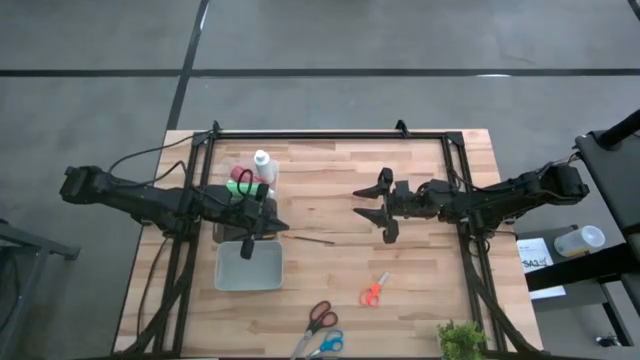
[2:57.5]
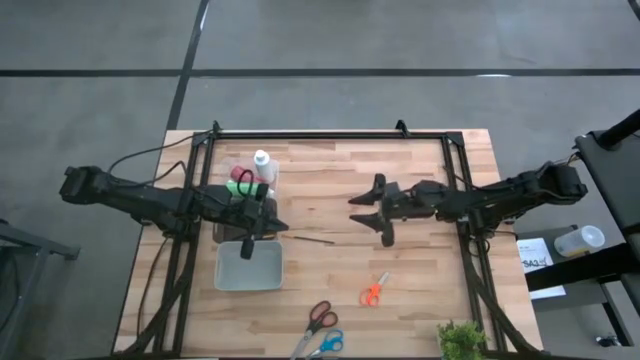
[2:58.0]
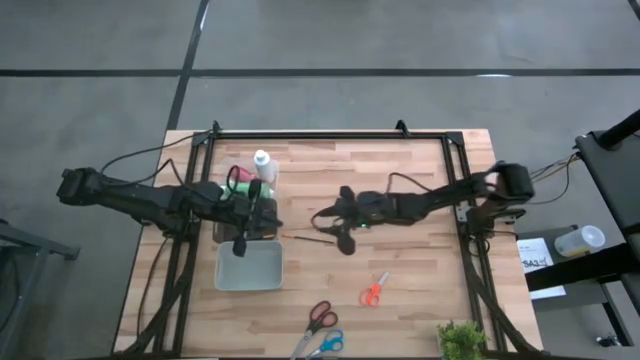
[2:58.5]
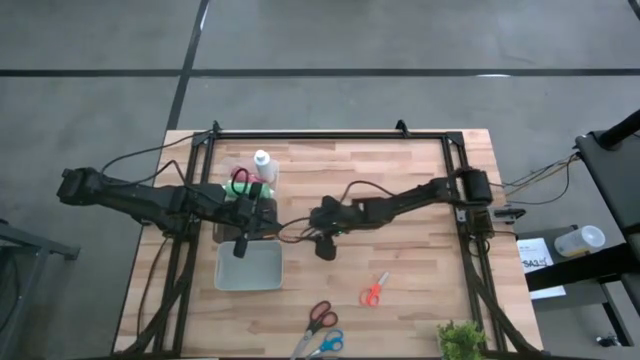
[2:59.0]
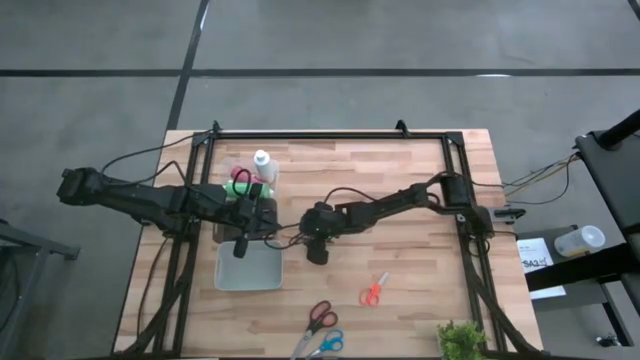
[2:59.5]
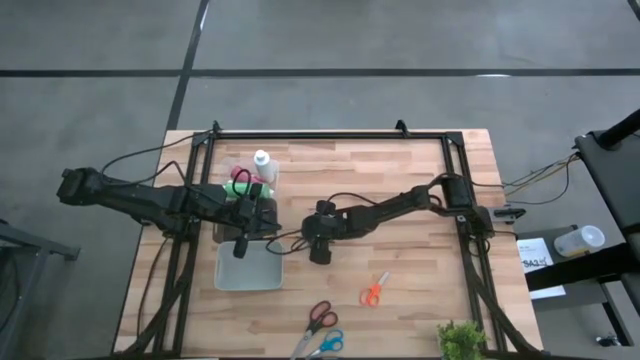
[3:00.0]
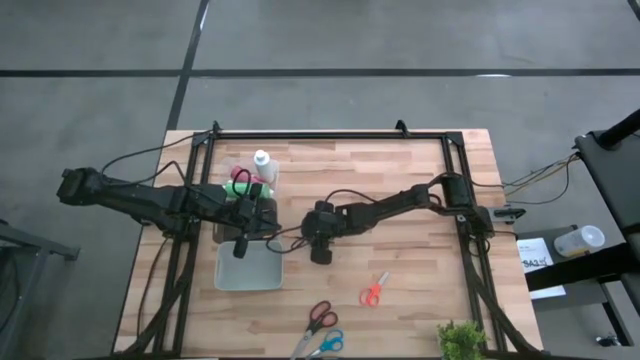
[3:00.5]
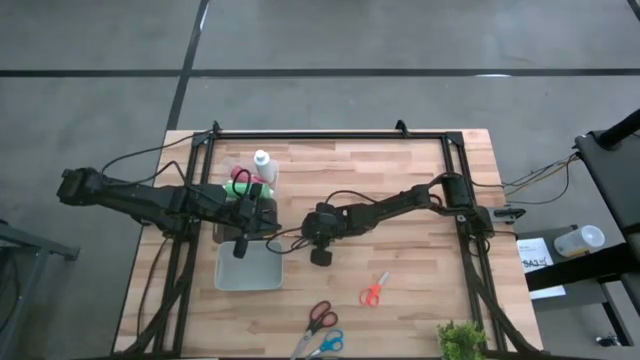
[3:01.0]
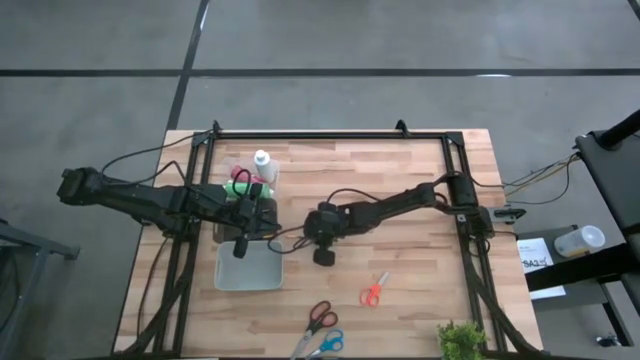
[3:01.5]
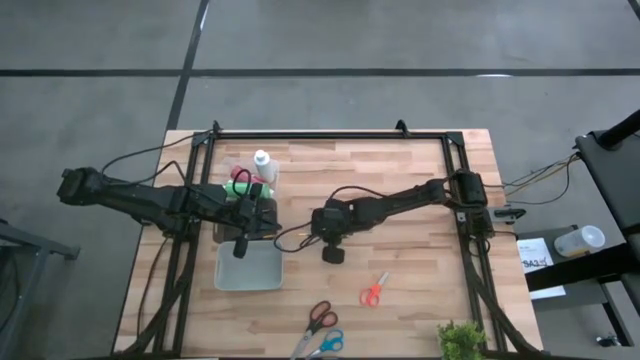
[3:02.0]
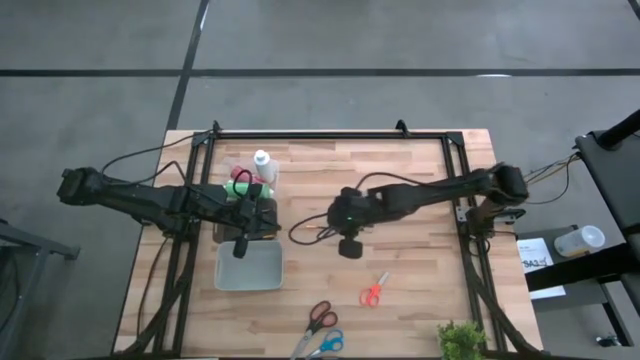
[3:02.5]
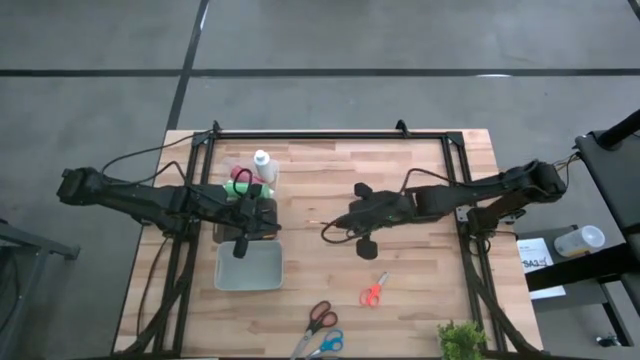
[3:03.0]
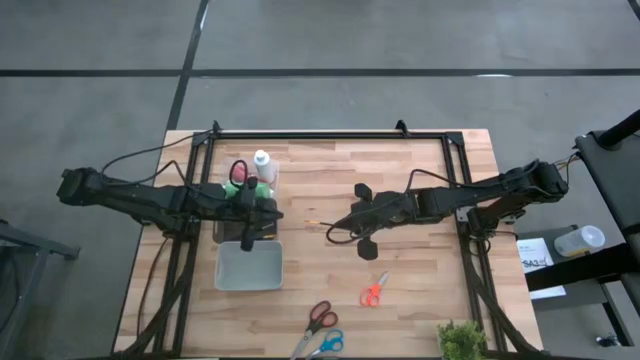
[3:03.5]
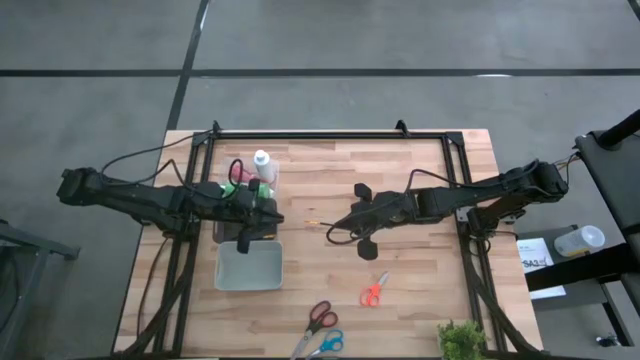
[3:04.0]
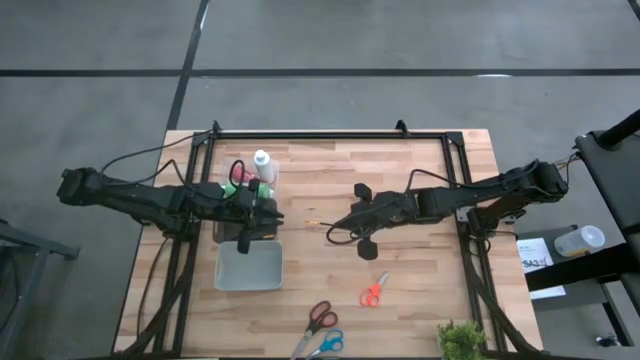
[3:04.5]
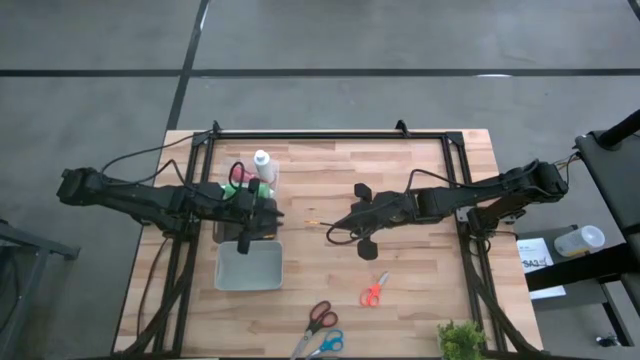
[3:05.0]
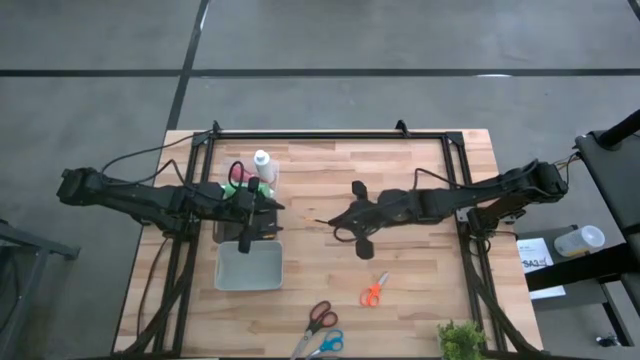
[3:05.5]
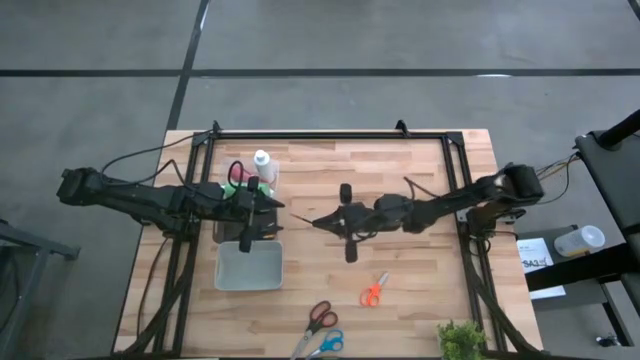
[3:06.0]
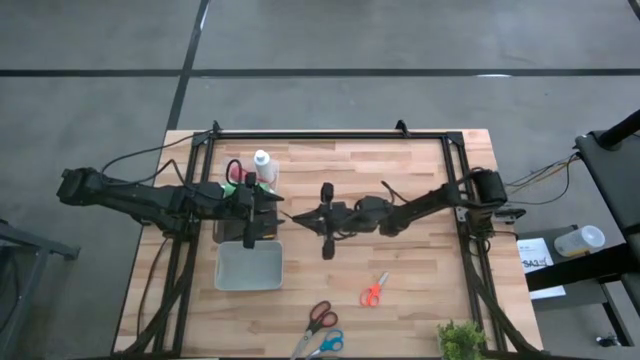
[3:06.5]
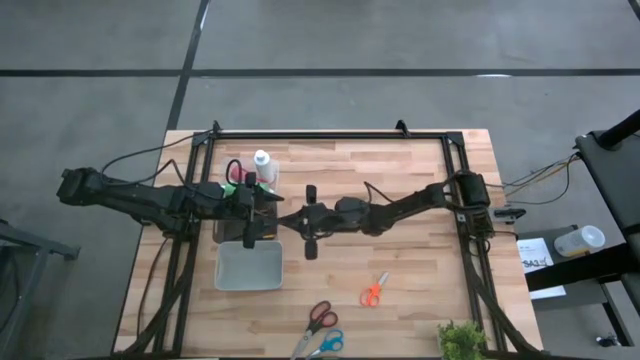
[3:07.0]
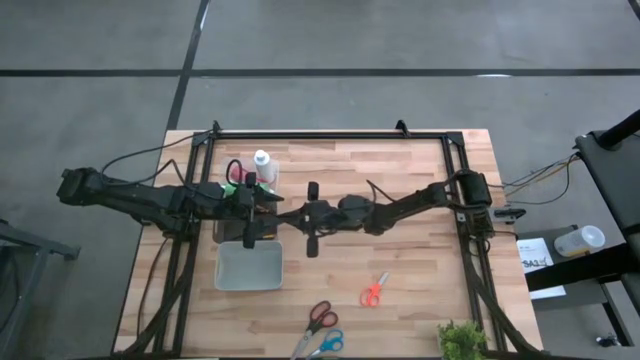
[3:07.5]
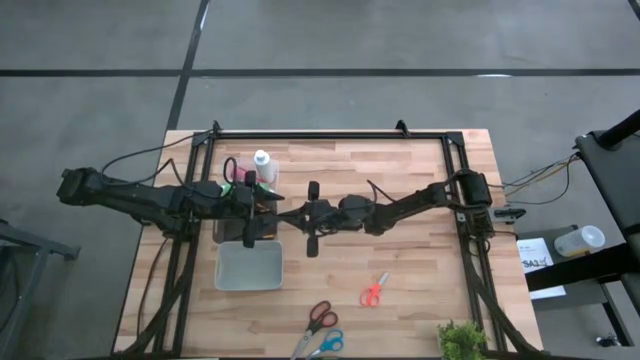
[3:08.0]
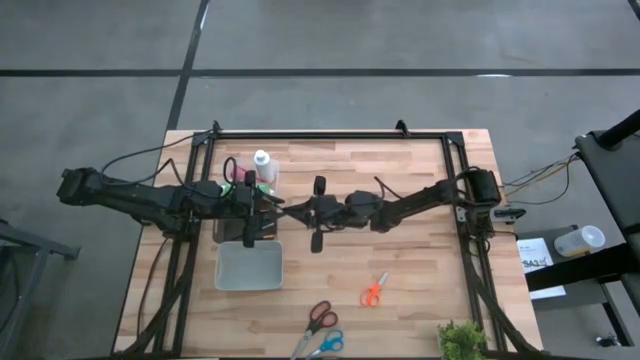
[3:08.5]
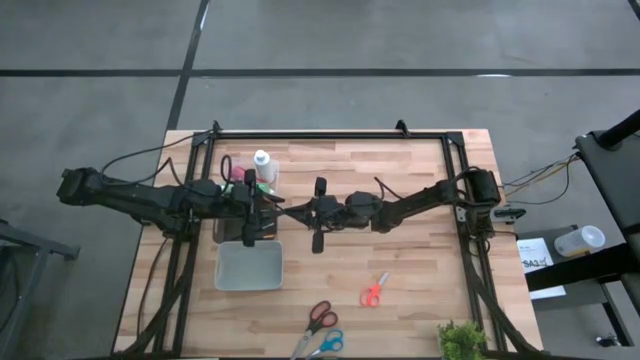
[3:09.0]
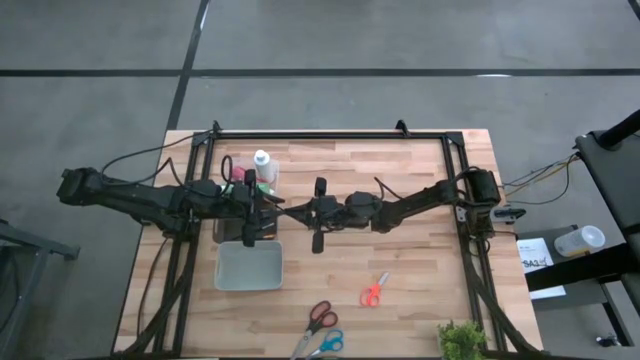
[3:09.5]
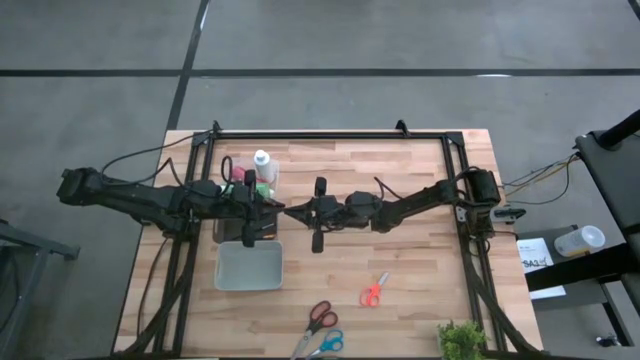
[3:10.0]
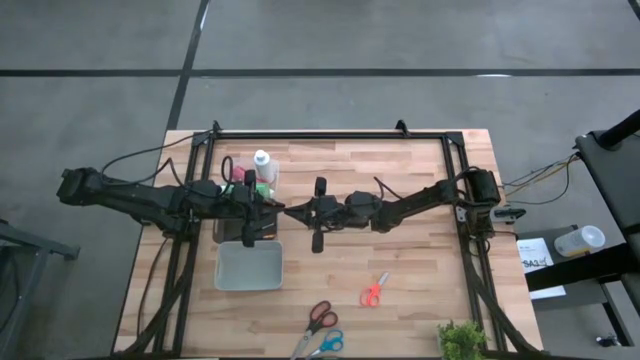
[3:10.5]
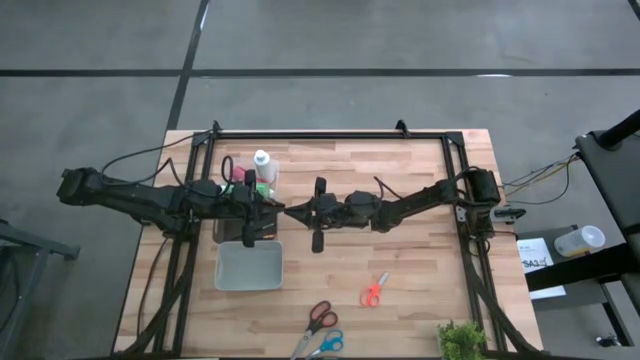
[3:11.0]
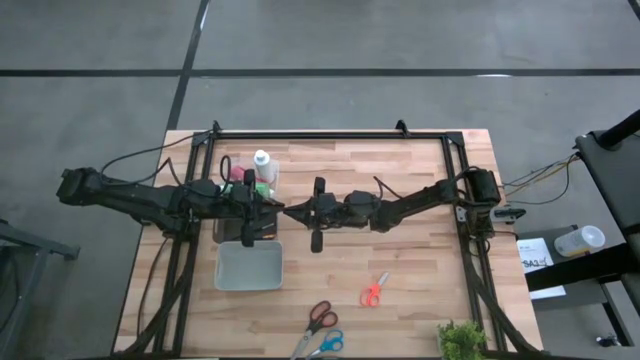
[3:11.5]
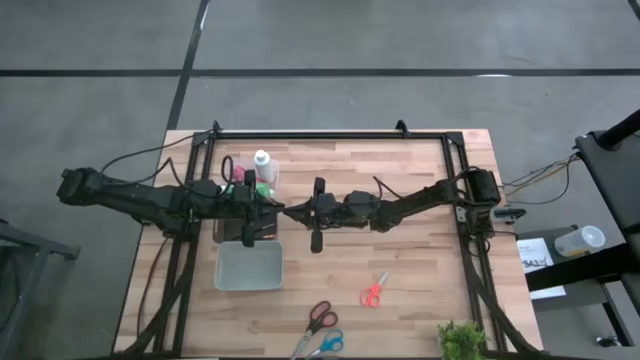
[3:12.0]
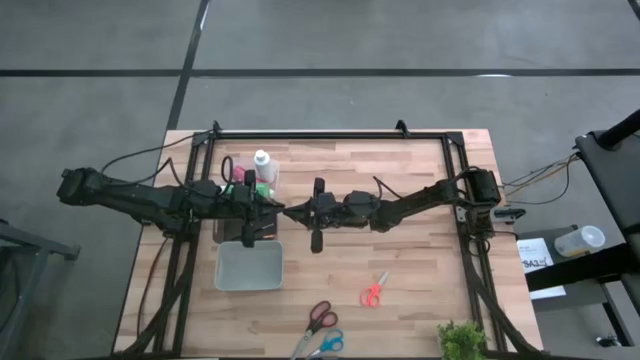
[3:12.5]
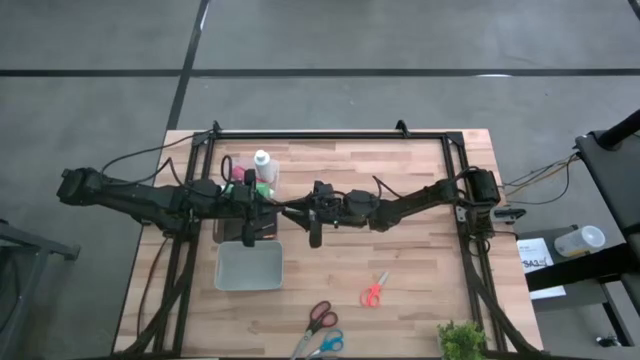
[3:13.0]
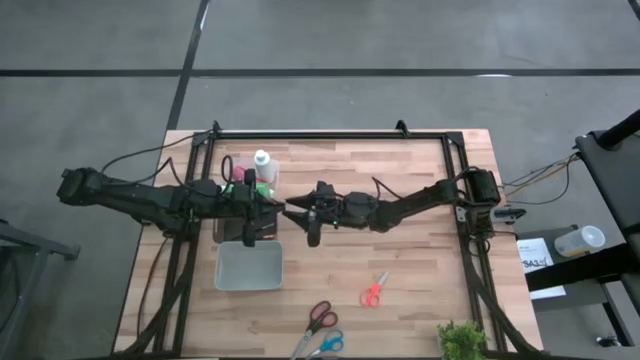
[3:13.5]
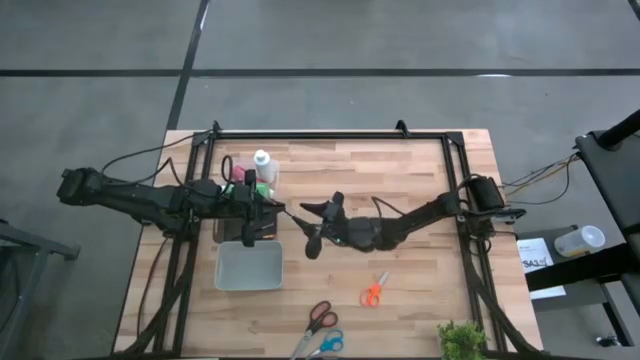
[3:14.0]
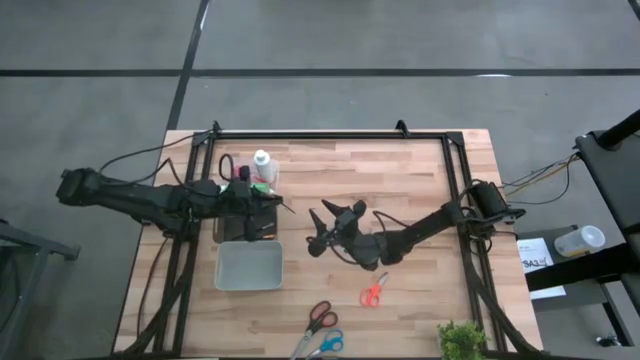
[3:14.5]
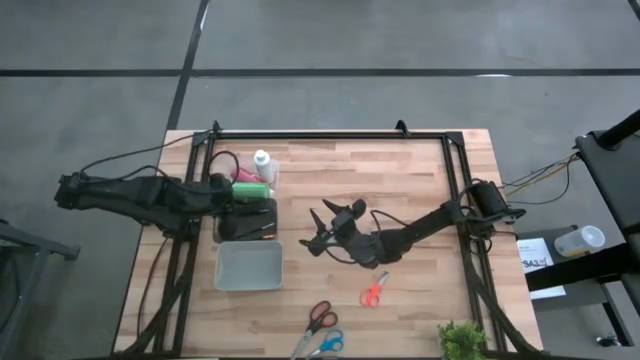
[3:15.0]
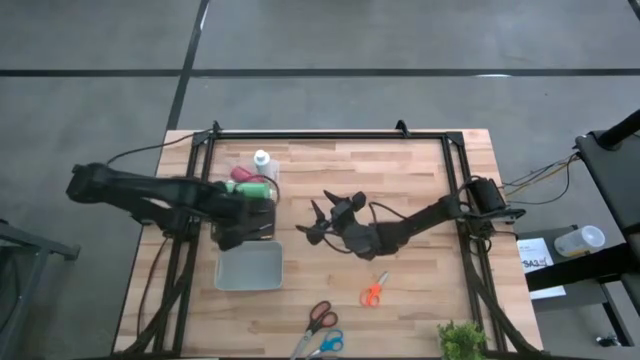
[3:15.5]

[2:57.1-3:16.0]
Task: Pick & Place Paint Supplies
Put the orange paint brush into the black bin

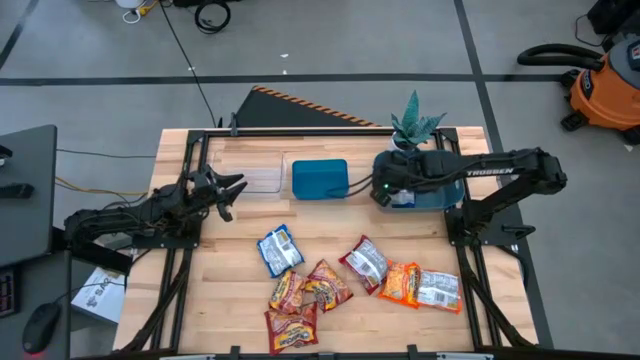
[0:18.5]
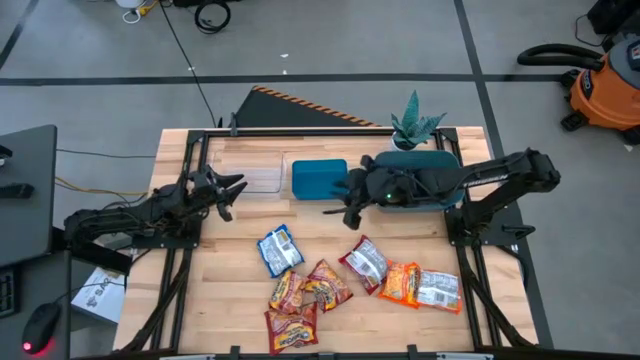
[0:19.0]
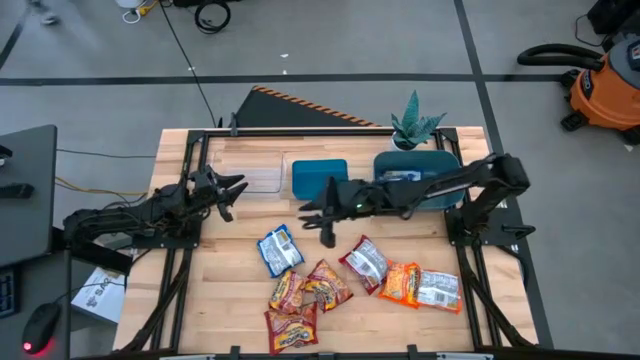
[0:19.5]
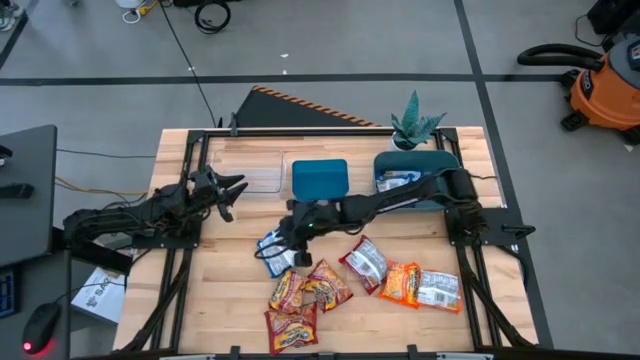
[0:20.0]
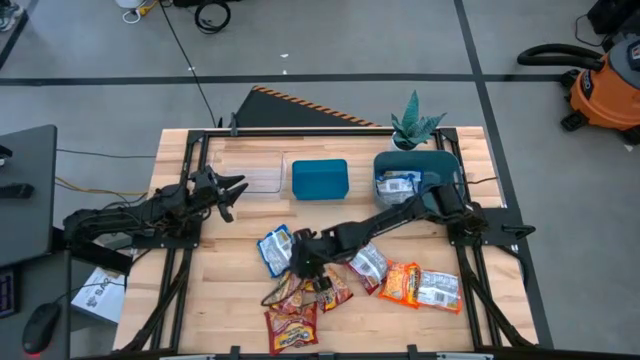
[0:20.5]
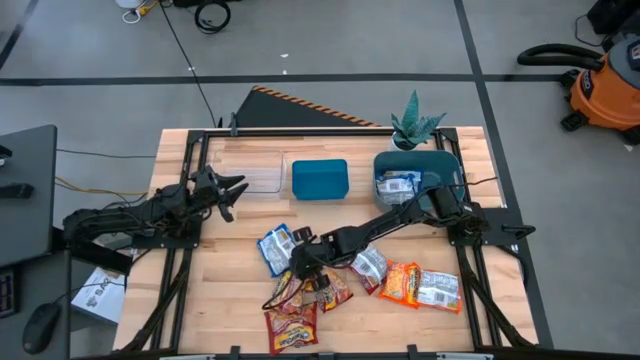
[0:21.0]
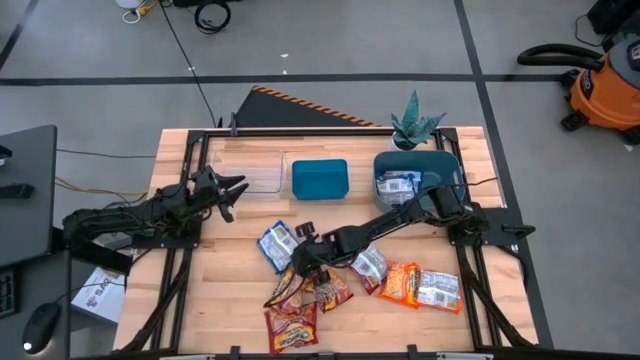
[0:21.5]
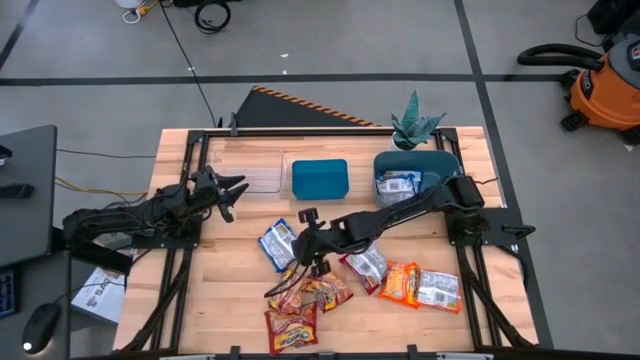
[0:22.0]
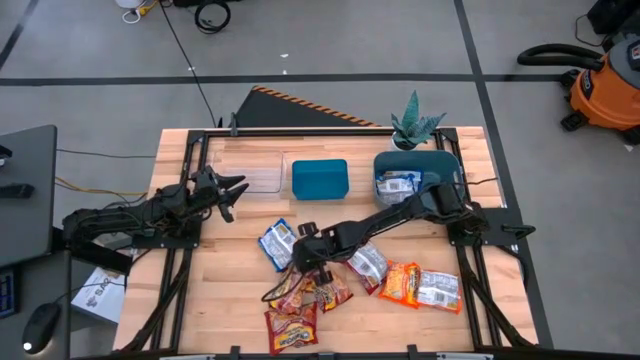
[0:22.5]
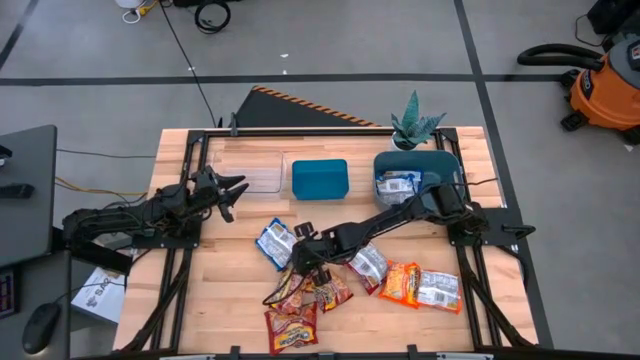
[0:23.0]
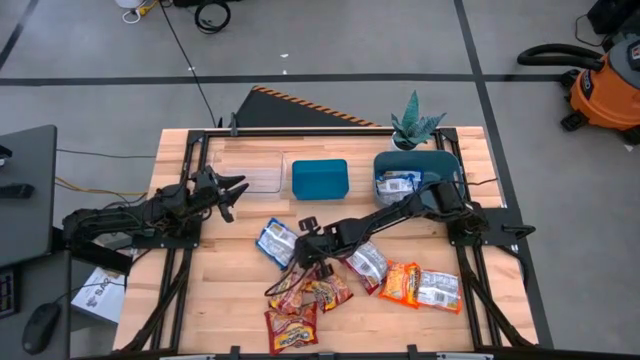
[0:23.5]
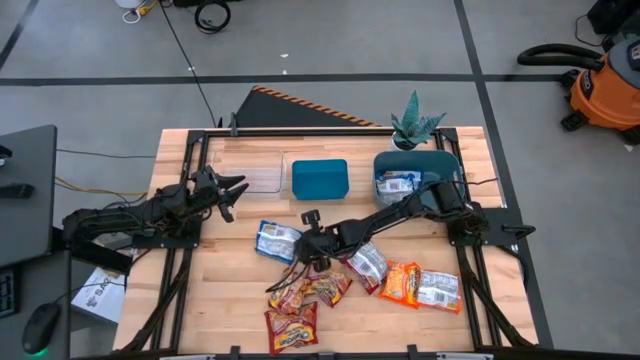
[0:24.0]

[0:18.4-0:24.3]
Task: Sort Maruchan noodles
Put the blue noodle pack into the green bin
